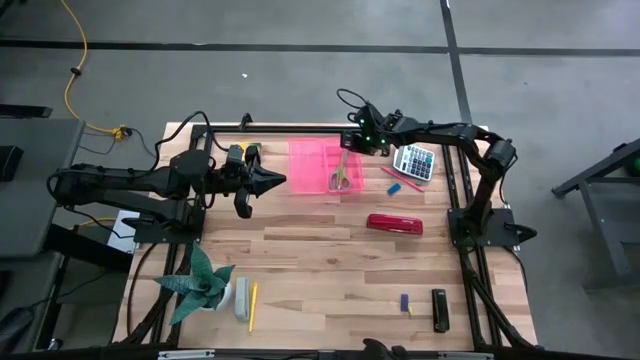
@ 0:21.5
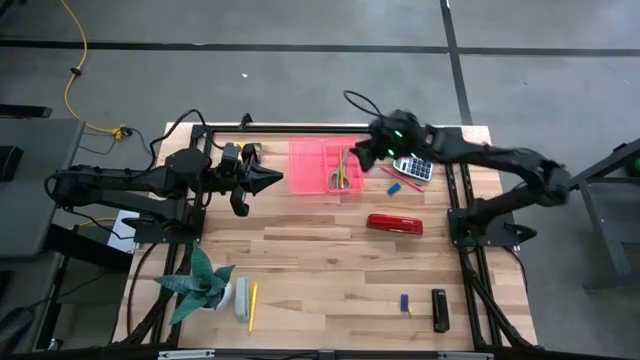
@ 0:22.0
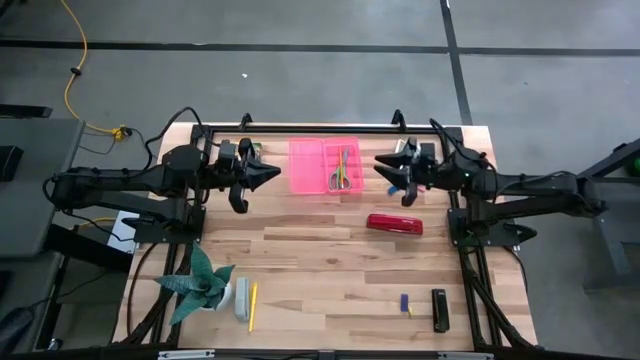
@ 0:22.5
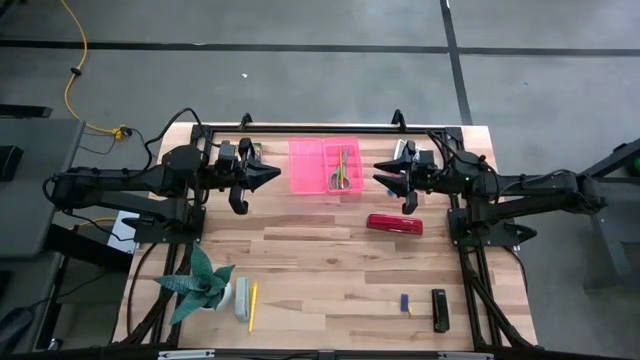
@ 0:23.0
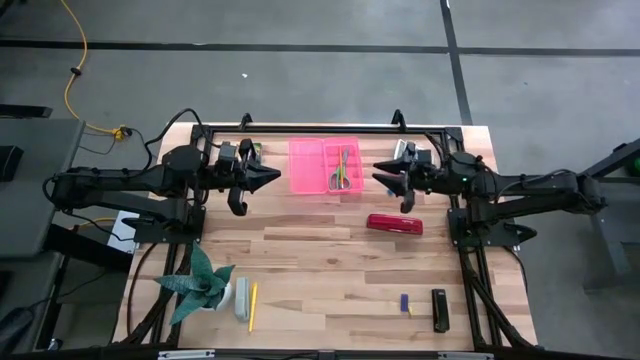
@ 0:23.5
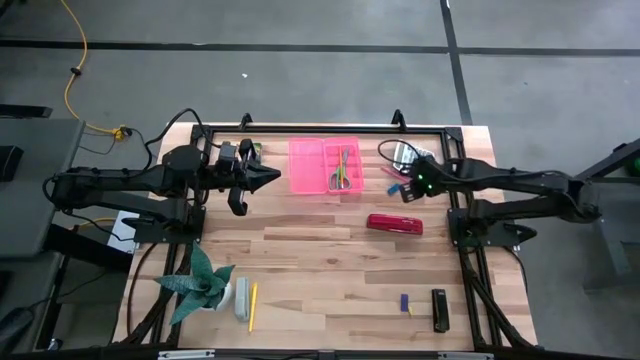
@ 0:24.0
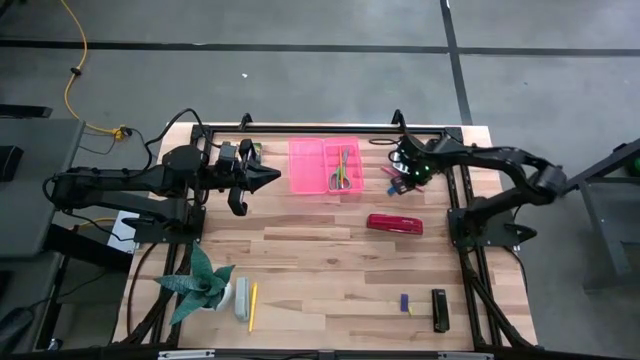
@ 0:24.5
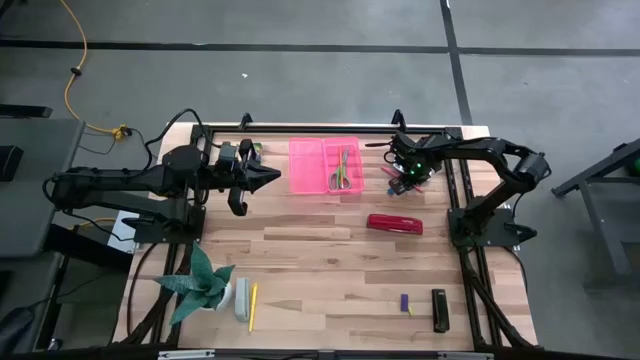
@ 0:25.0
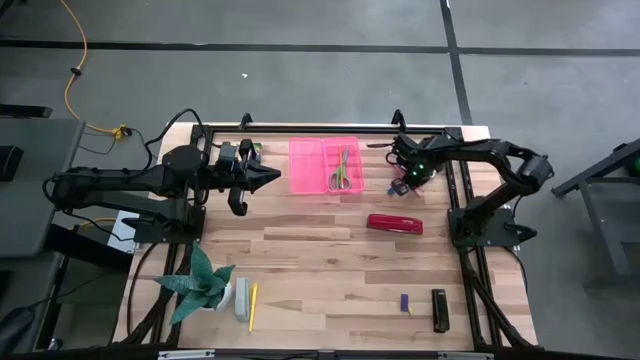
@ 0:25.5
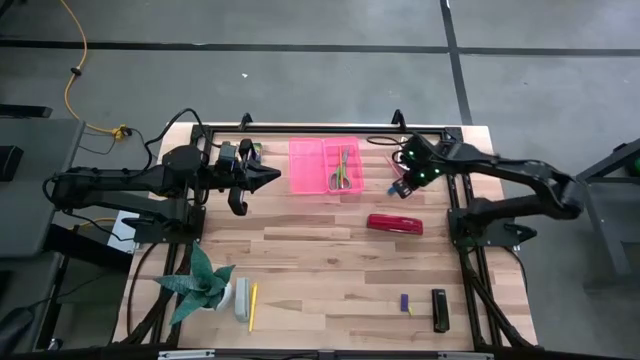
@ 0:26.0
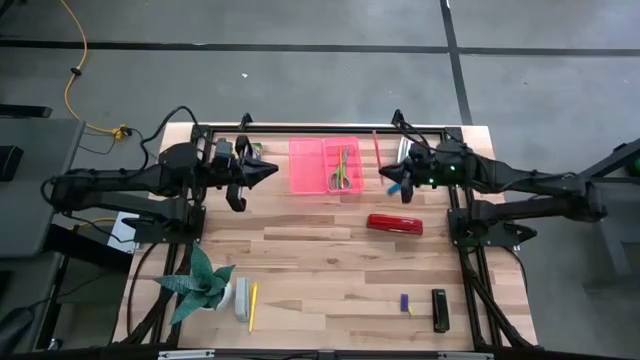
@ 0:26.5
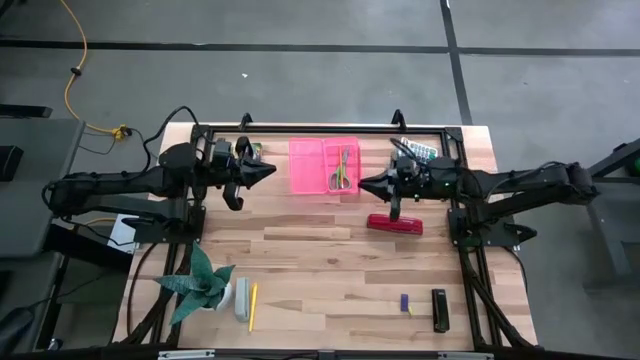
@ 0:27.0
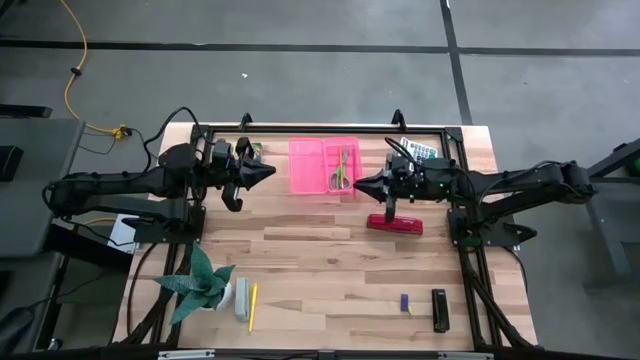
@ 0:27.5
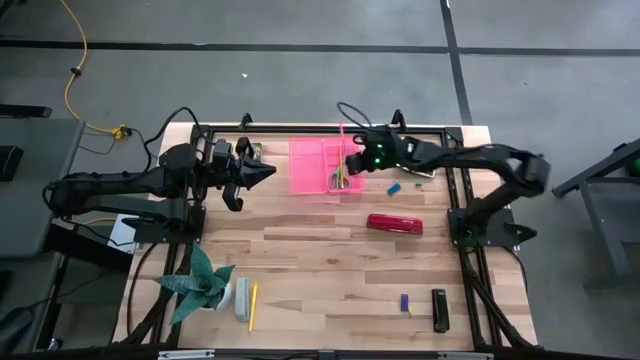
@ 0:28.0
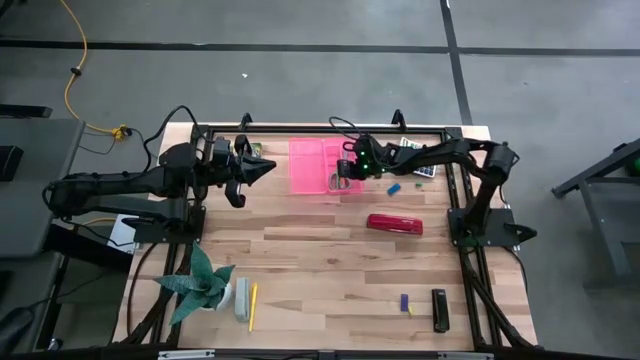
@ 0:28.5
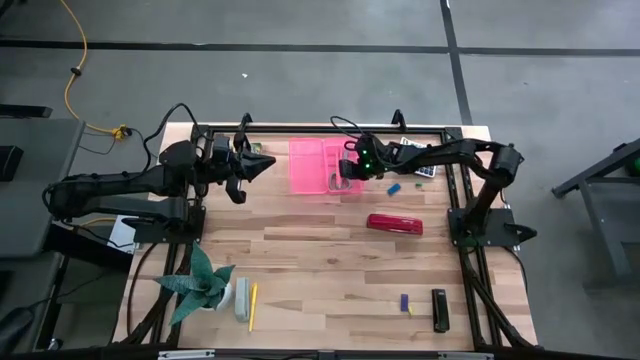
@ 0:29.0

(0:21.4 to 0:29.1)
Task: Pack school essentials
Put the pink pencil into the pink supply box

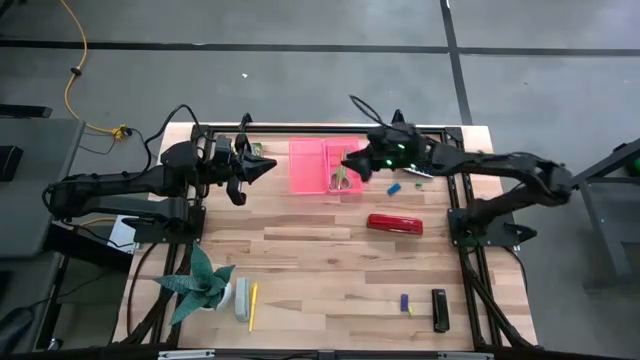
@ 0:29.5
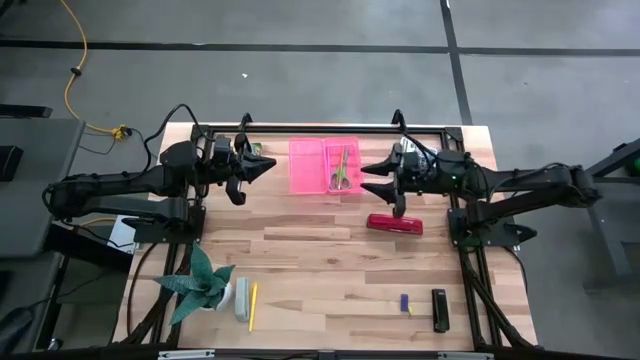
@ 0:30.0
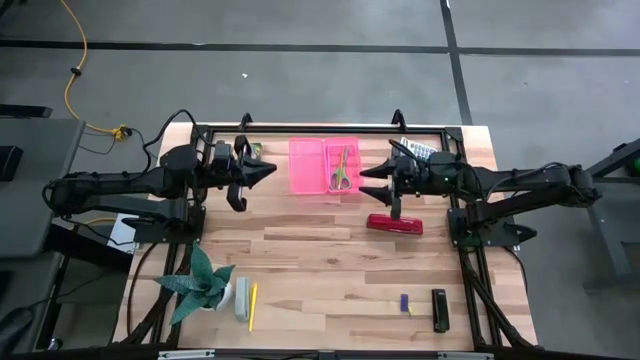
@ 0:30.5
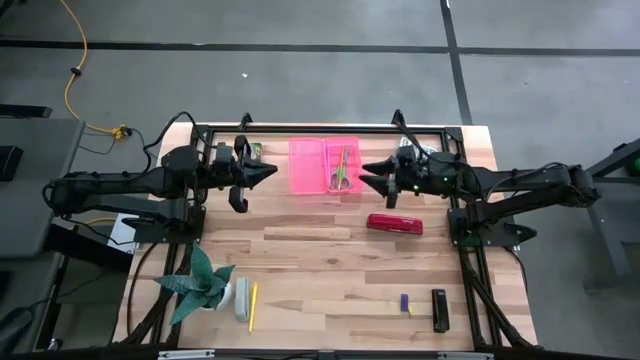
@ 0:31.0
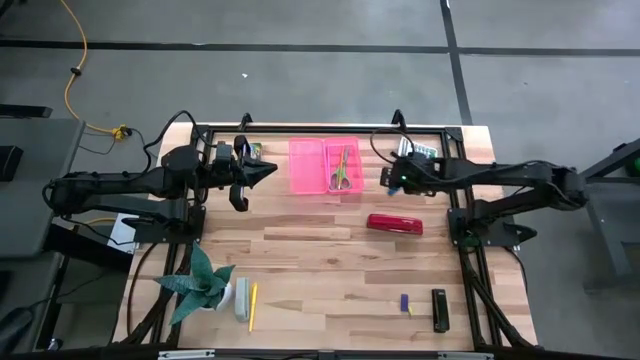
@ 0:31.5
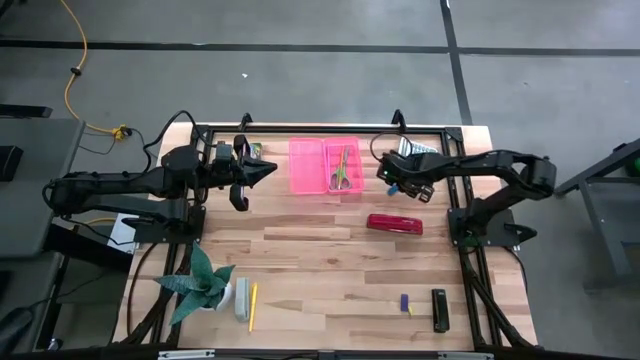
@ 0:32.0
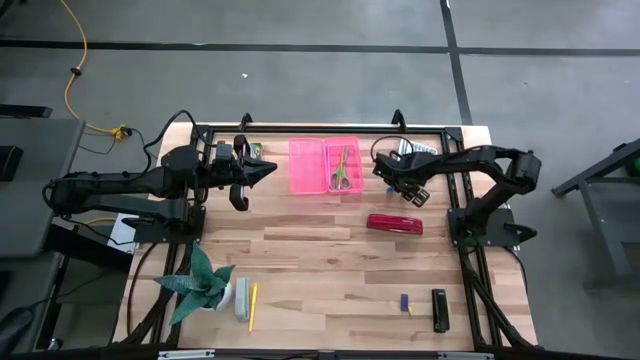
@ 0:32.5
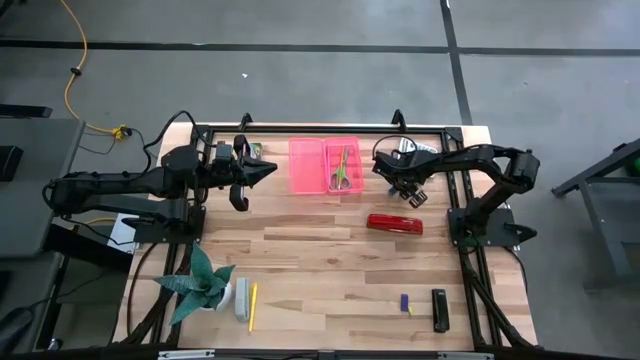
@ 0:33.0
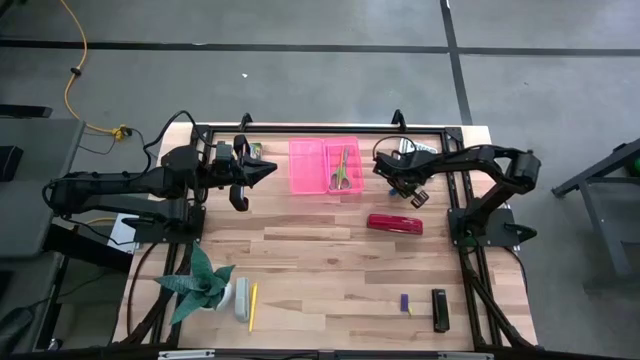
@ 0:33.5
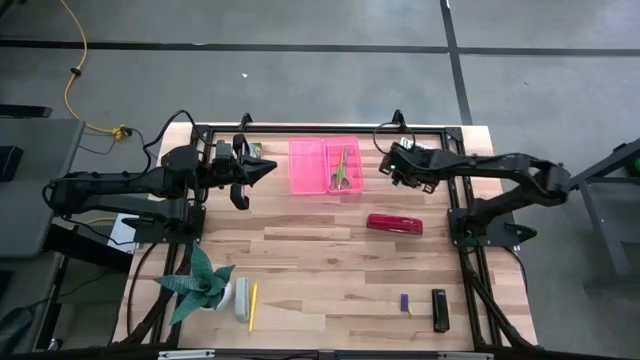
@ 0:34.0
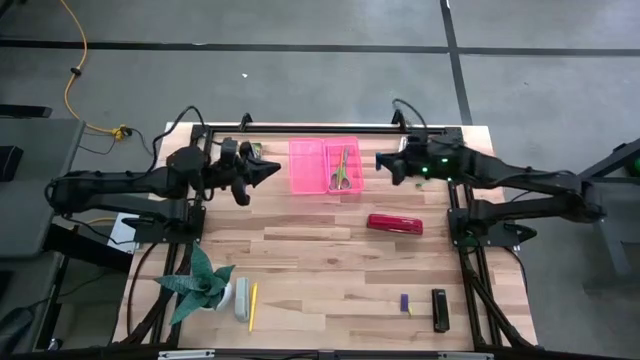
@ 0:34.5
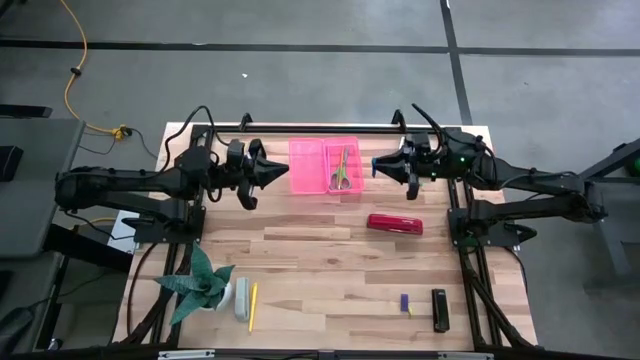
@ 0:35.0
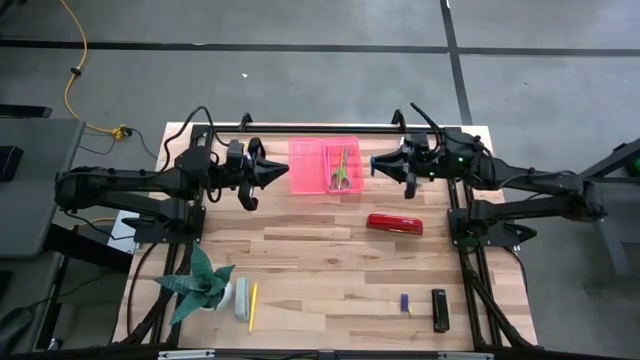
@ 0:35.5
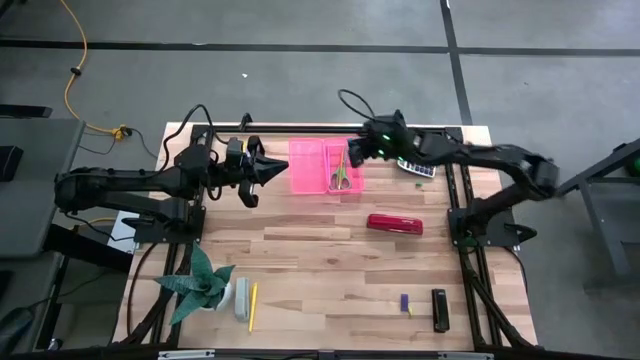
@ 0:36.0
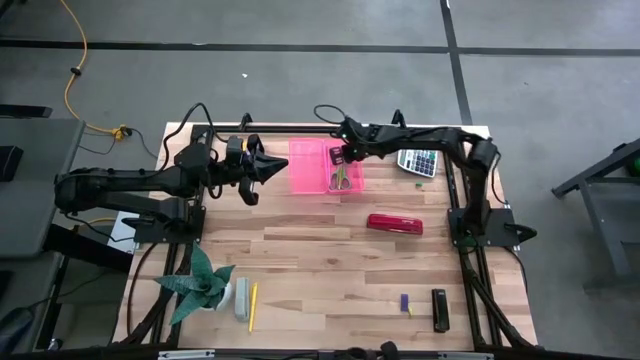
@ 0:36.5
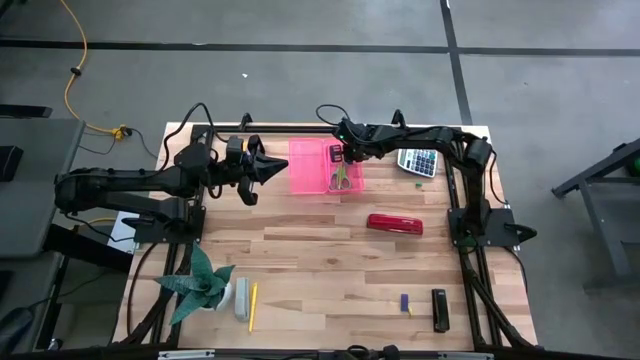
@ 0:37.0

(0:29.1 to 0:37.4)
Put the top blue eraser into the pink supply box

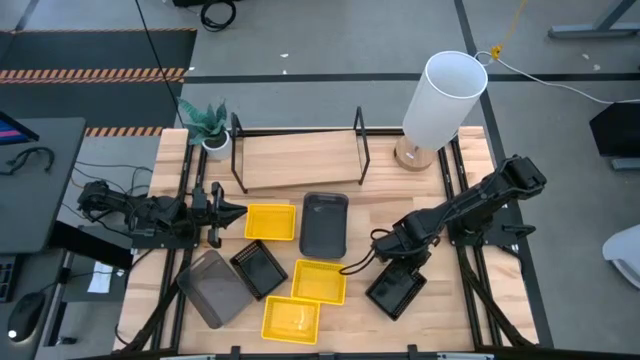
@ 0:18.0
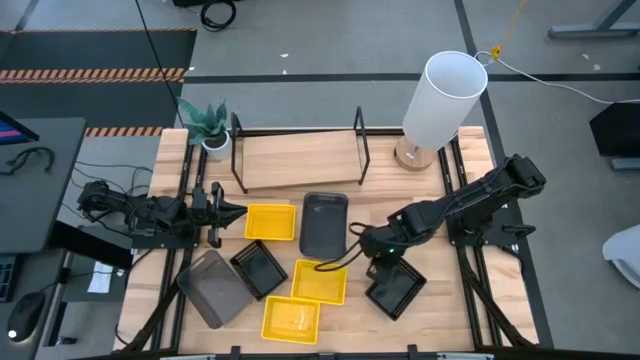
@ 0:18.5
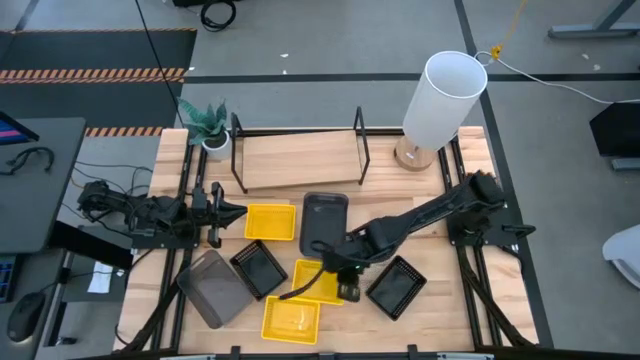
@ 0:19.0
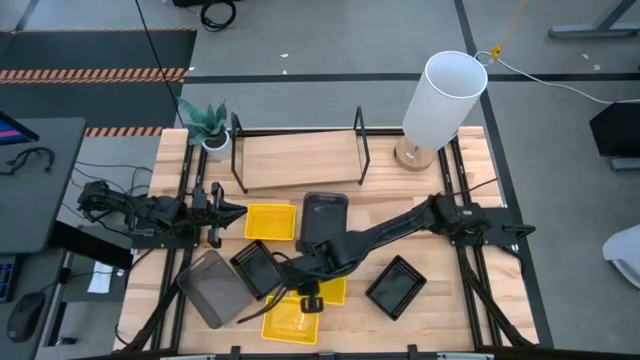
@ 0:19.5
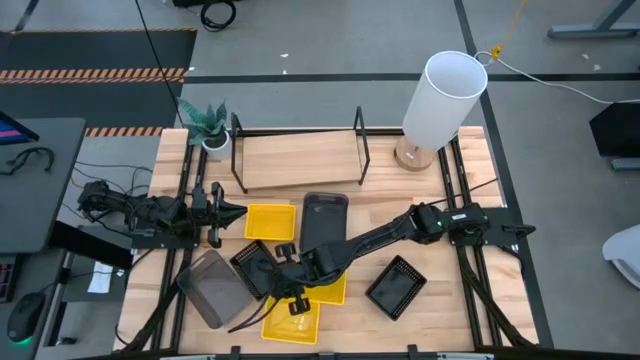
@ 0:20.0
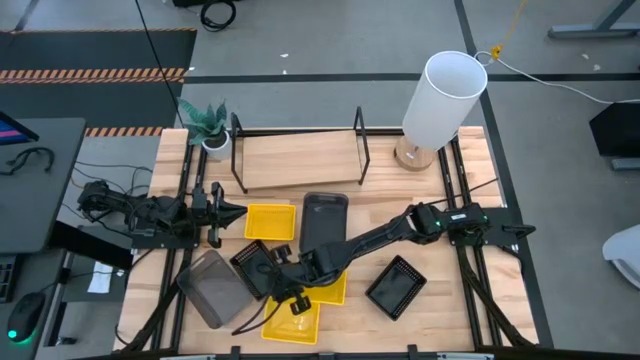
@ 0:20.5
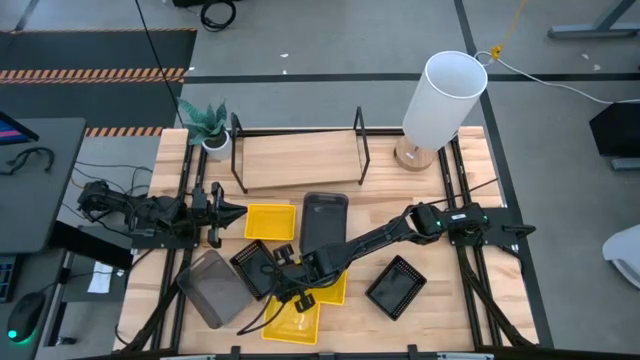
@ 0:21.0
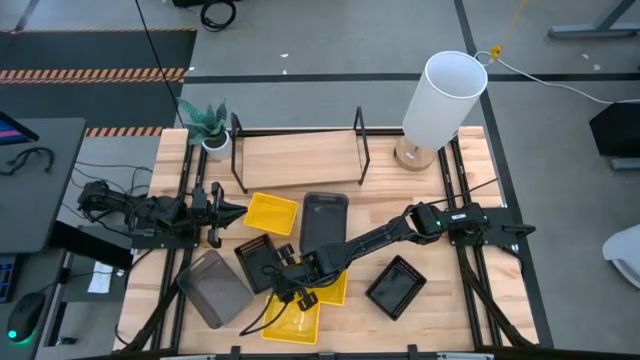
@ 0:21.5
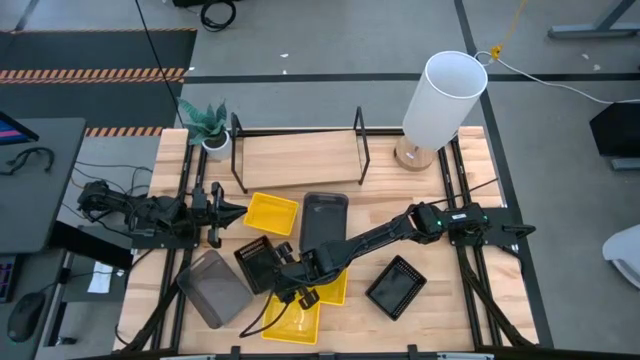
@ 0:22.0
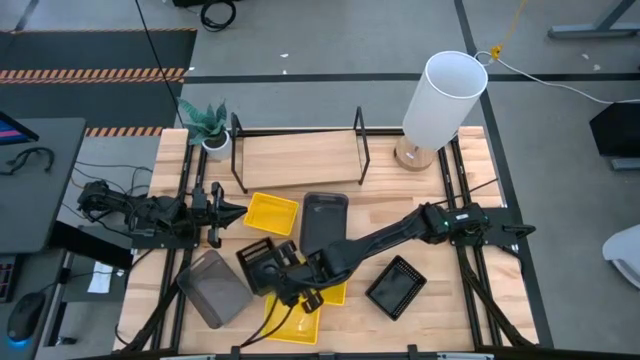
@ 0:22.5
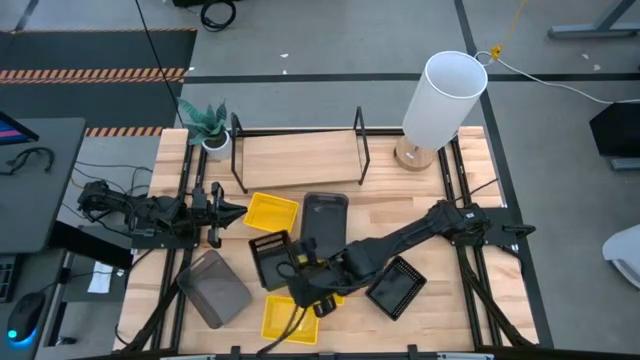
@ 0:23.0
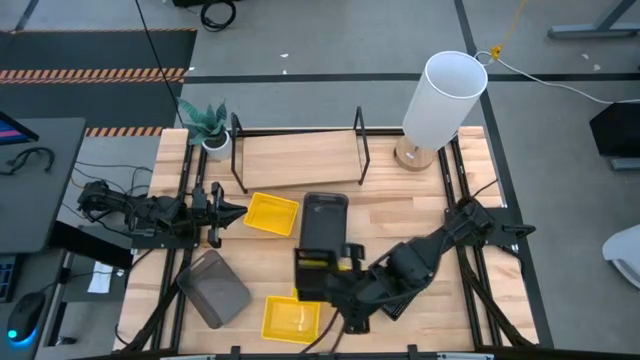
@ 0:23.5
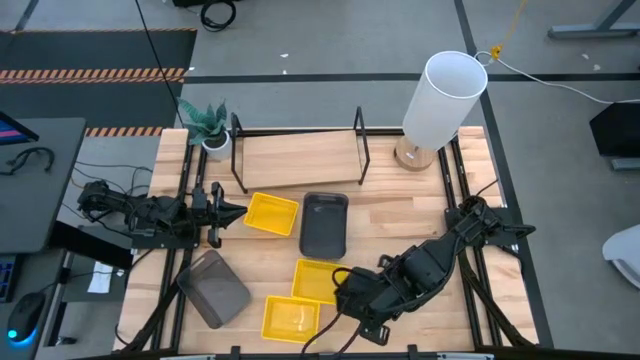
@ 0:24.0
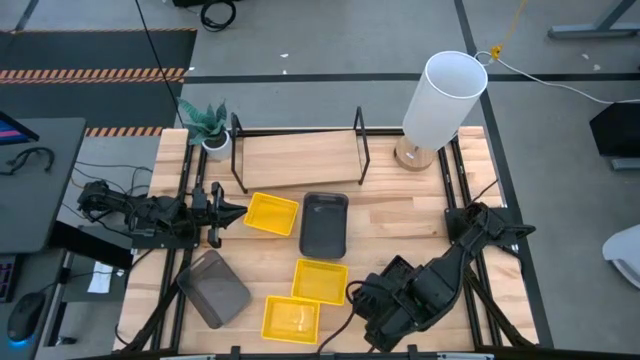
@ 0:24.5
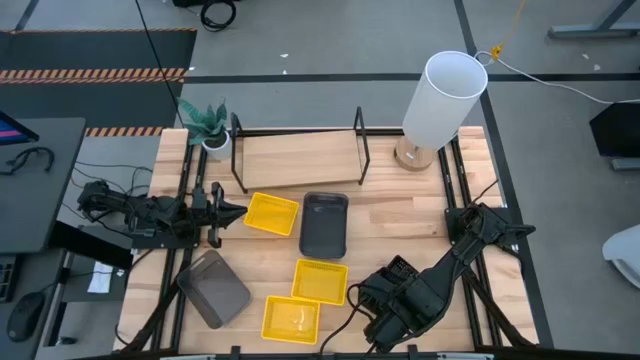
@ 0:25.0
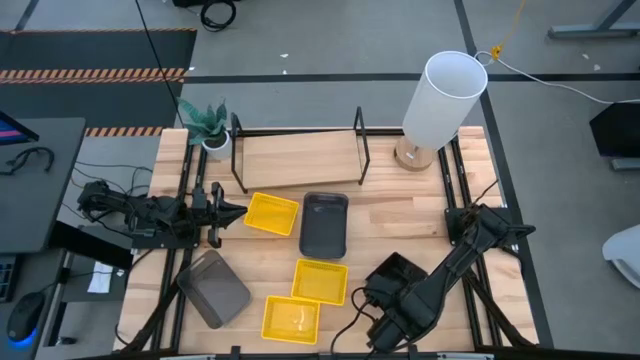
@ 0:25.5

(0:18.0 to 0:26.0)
Task: Stack baskets on shelf by color
Stack the black bin on the black bin
